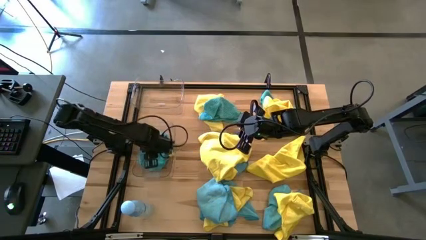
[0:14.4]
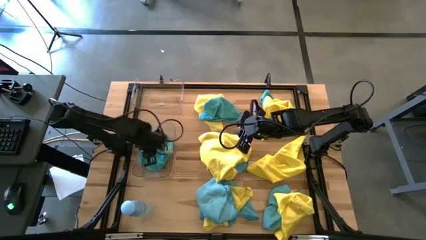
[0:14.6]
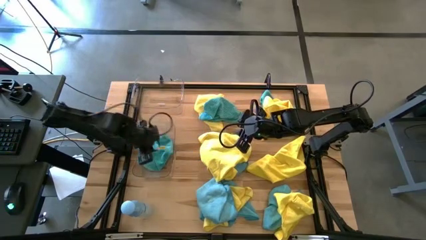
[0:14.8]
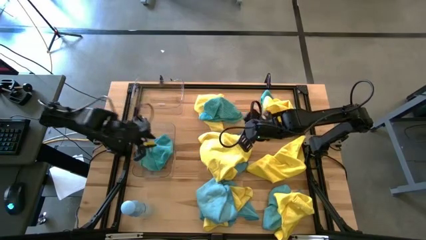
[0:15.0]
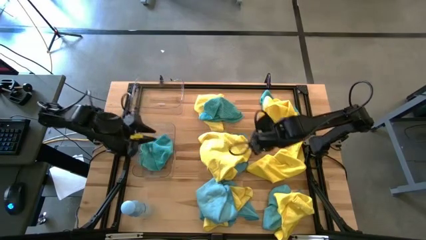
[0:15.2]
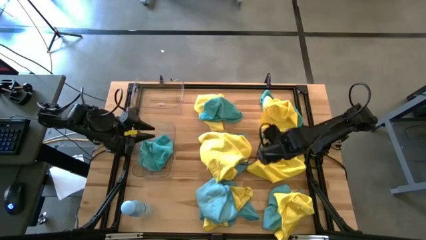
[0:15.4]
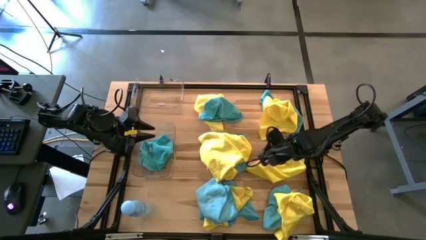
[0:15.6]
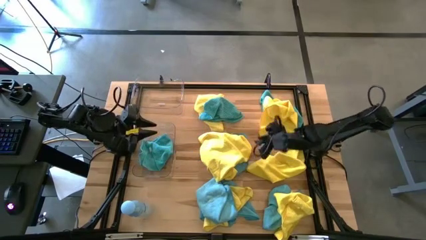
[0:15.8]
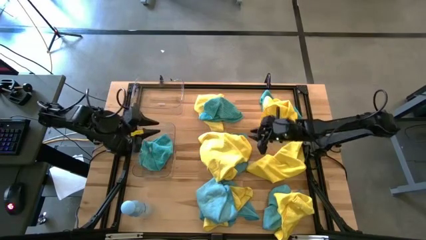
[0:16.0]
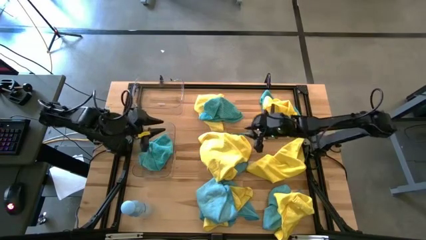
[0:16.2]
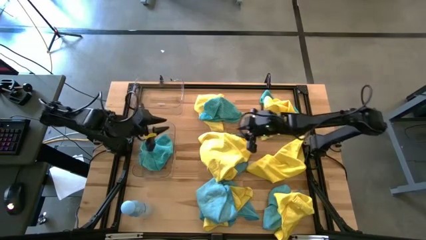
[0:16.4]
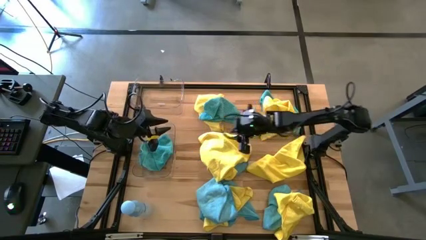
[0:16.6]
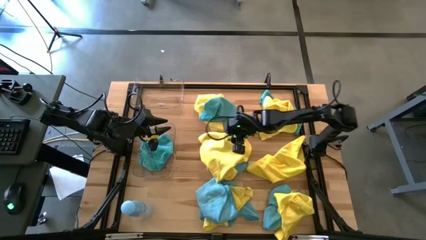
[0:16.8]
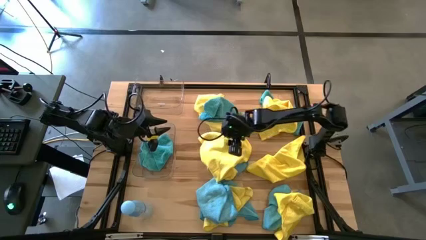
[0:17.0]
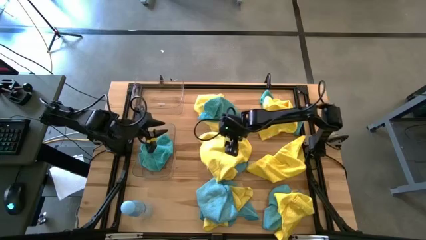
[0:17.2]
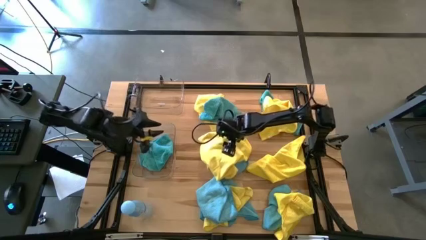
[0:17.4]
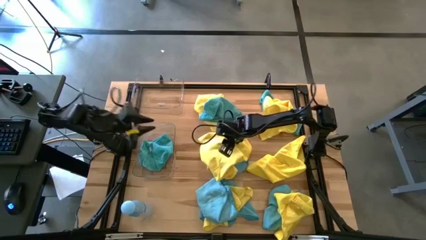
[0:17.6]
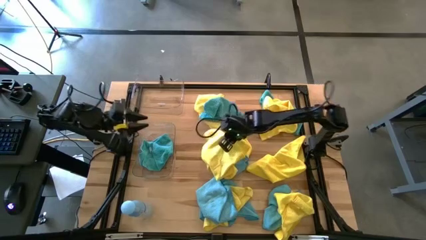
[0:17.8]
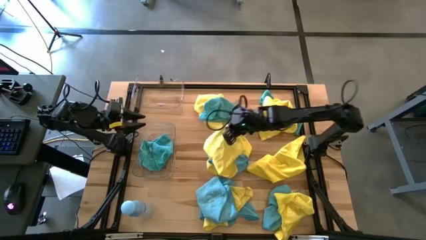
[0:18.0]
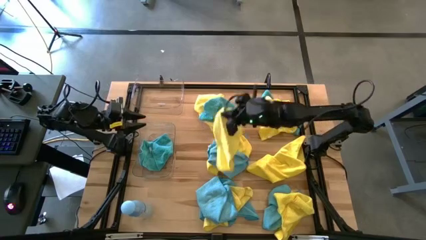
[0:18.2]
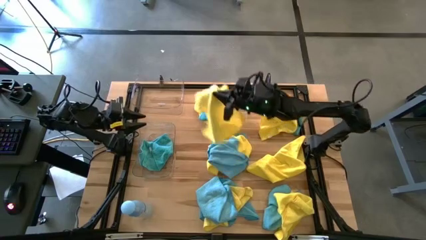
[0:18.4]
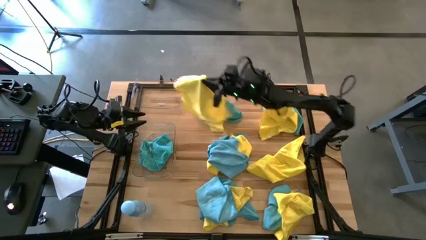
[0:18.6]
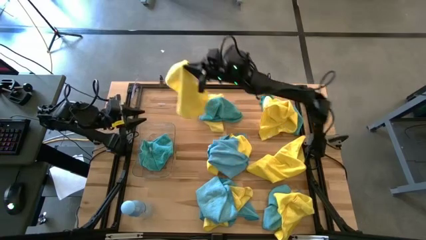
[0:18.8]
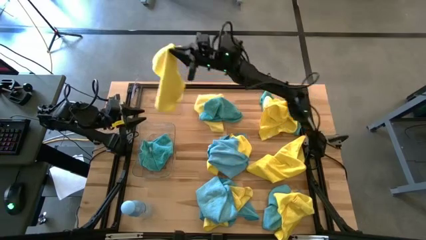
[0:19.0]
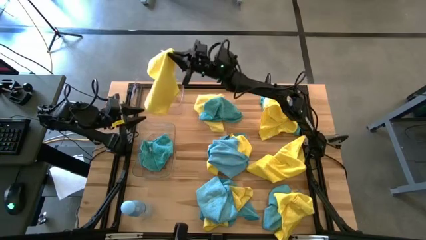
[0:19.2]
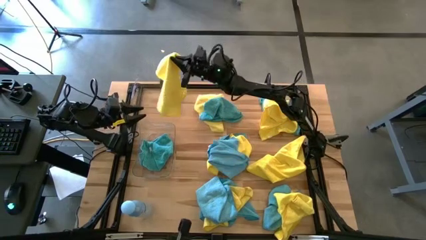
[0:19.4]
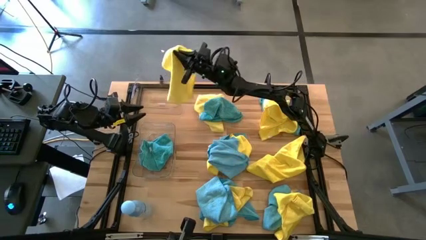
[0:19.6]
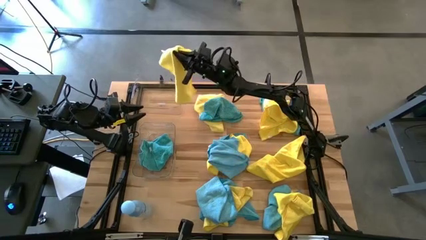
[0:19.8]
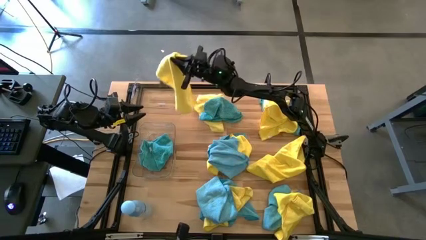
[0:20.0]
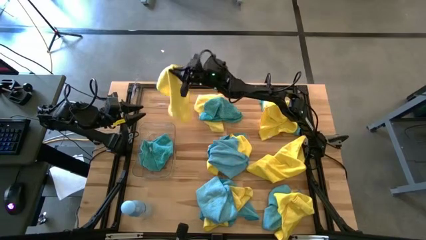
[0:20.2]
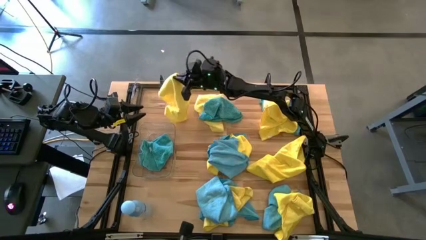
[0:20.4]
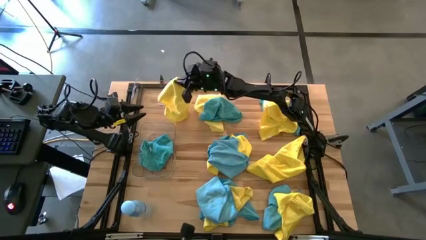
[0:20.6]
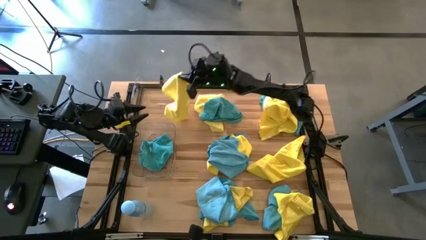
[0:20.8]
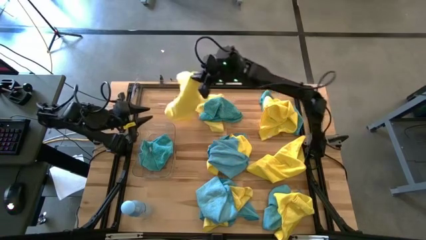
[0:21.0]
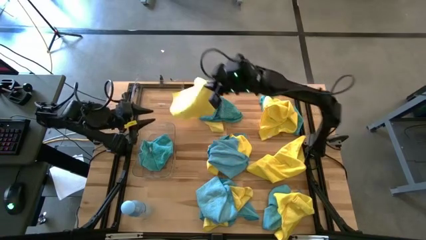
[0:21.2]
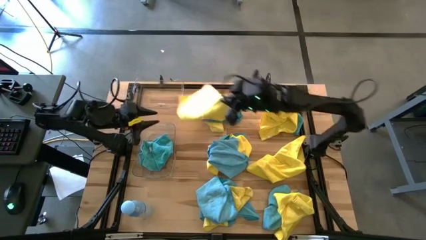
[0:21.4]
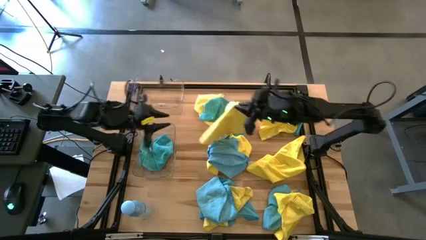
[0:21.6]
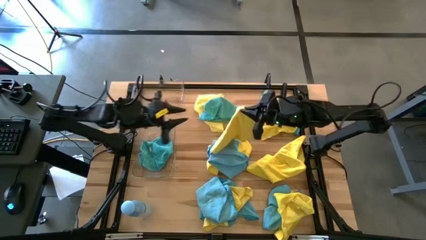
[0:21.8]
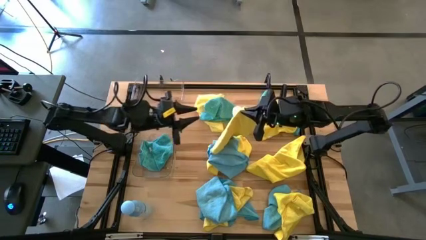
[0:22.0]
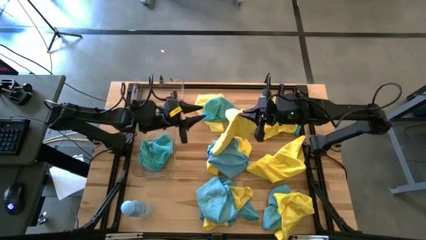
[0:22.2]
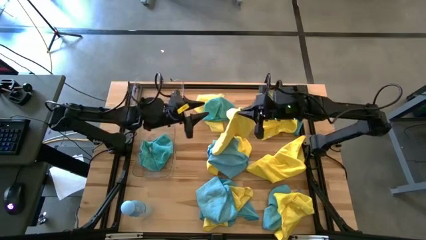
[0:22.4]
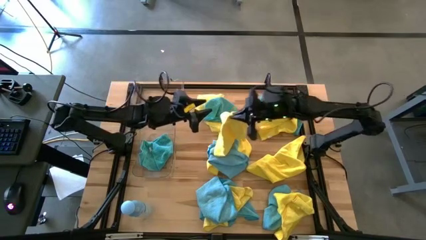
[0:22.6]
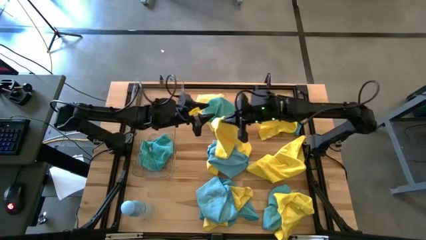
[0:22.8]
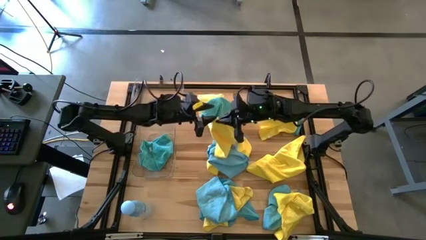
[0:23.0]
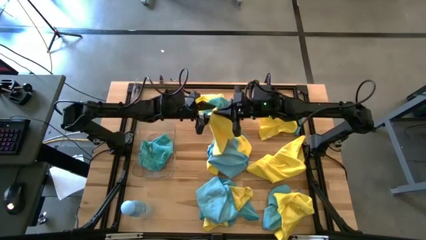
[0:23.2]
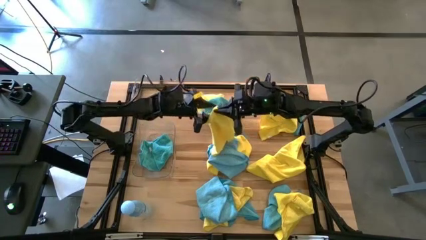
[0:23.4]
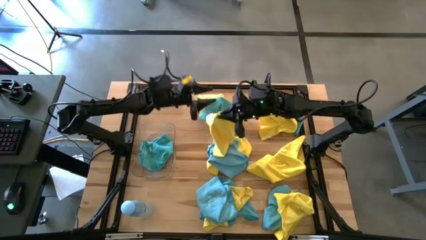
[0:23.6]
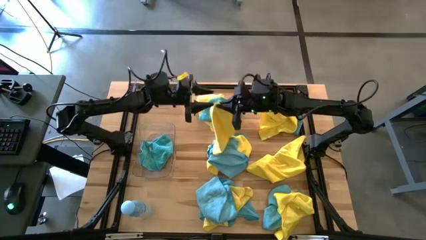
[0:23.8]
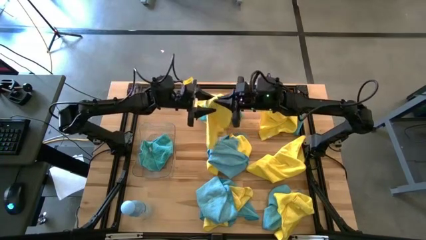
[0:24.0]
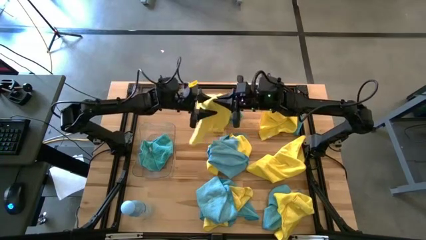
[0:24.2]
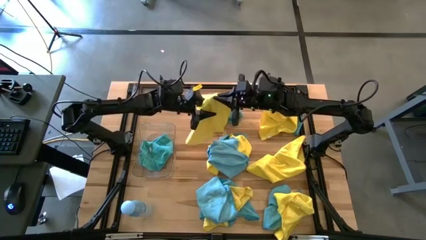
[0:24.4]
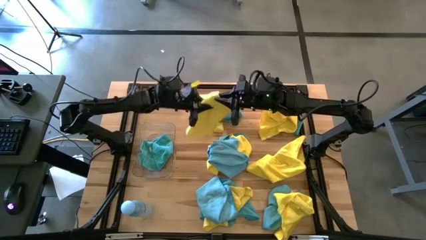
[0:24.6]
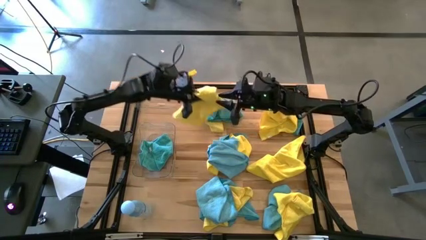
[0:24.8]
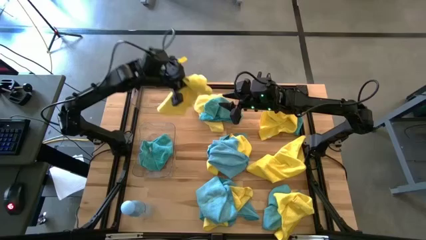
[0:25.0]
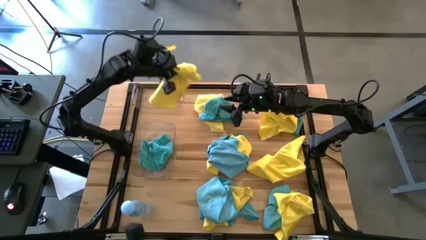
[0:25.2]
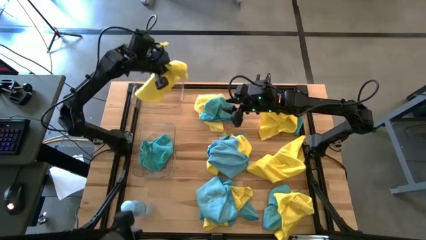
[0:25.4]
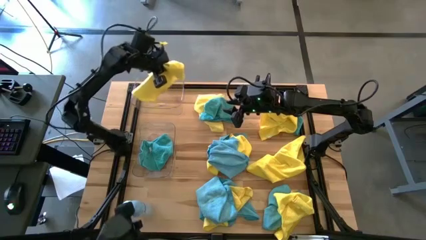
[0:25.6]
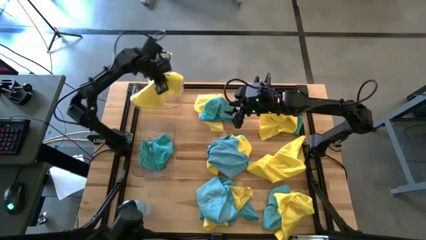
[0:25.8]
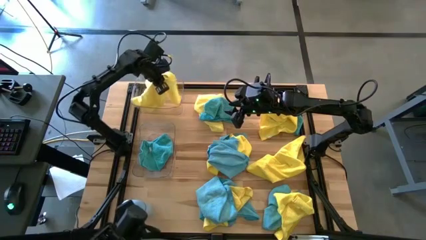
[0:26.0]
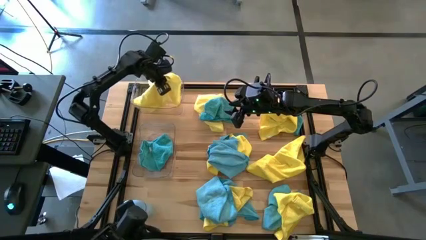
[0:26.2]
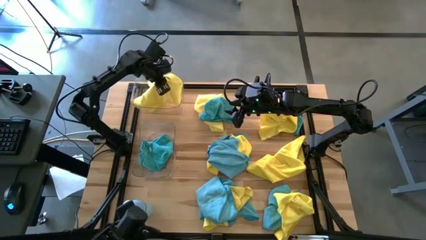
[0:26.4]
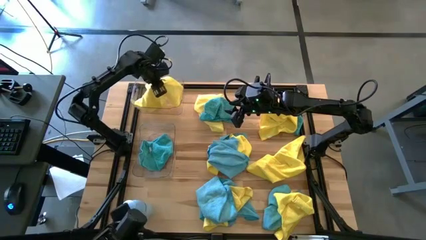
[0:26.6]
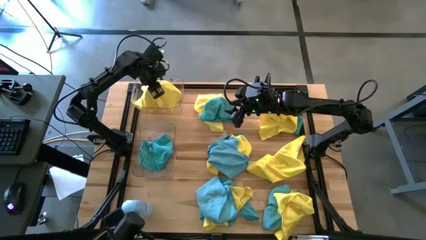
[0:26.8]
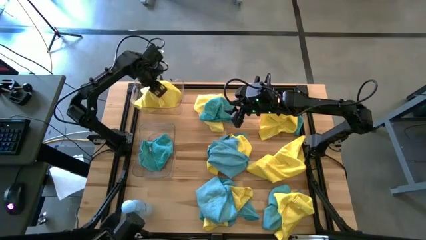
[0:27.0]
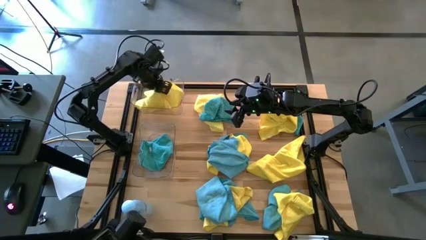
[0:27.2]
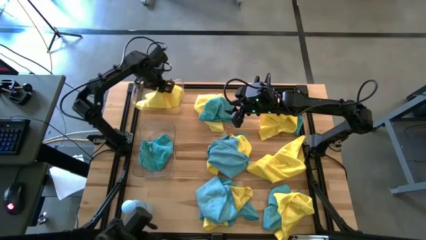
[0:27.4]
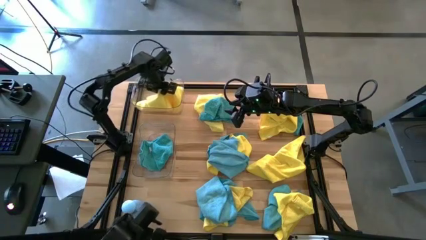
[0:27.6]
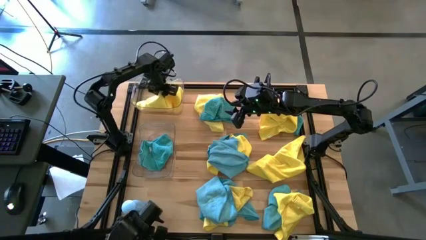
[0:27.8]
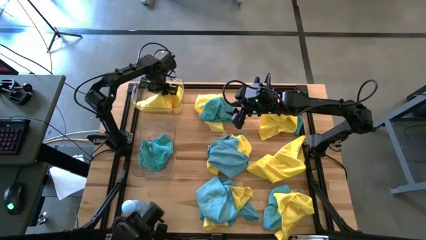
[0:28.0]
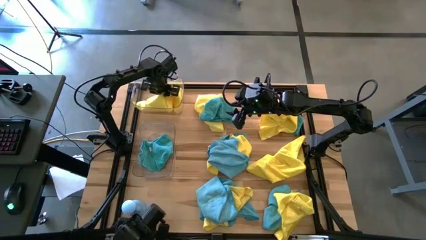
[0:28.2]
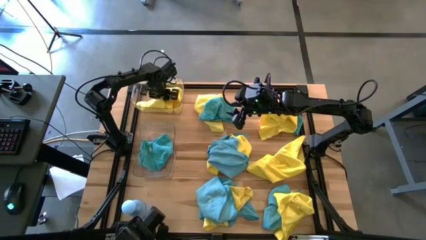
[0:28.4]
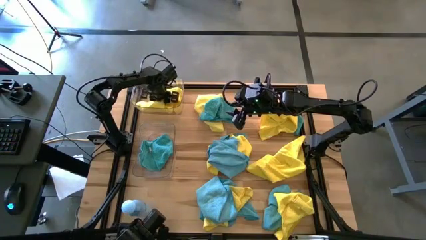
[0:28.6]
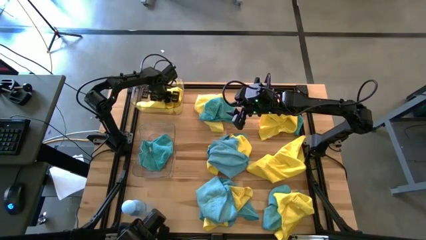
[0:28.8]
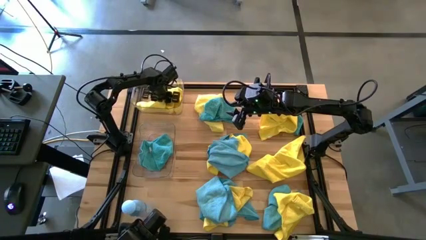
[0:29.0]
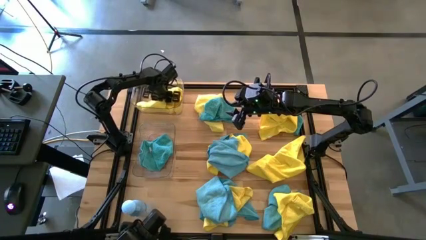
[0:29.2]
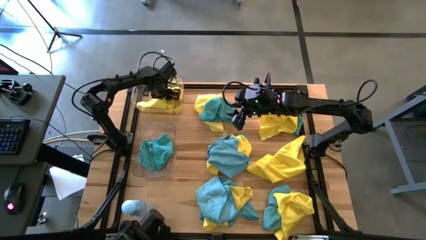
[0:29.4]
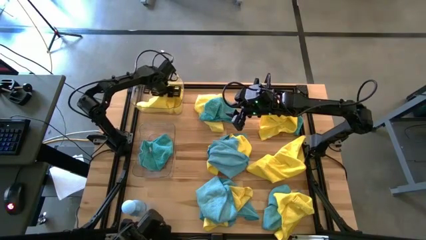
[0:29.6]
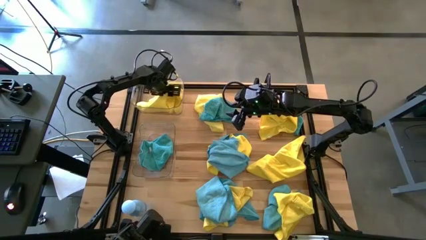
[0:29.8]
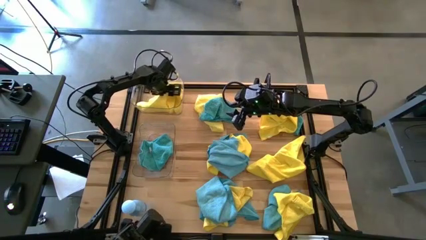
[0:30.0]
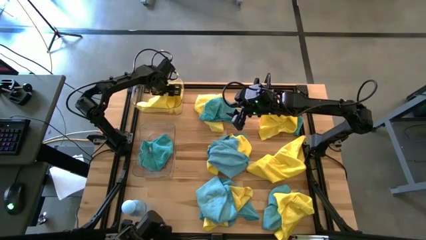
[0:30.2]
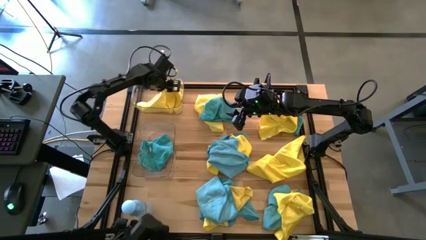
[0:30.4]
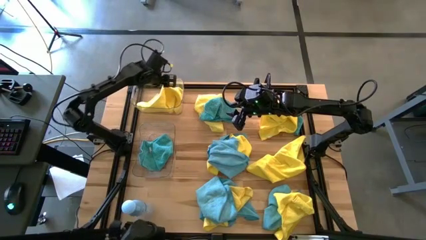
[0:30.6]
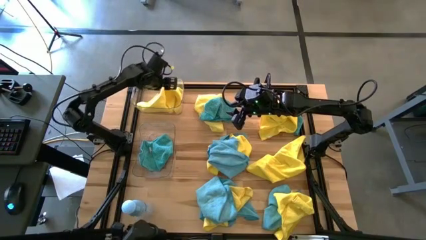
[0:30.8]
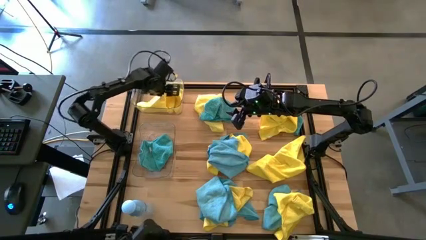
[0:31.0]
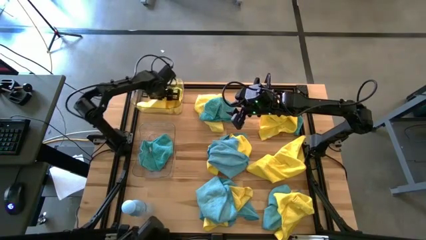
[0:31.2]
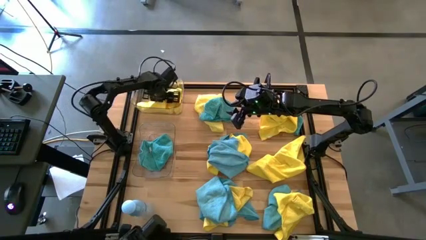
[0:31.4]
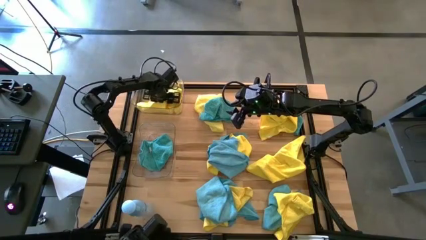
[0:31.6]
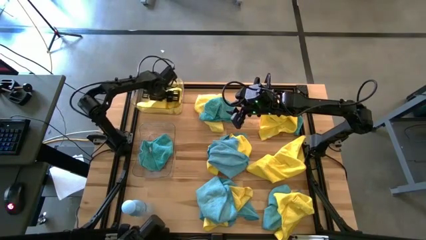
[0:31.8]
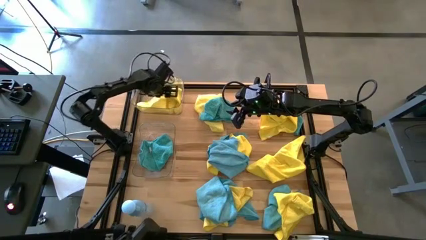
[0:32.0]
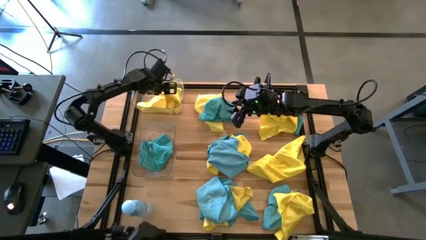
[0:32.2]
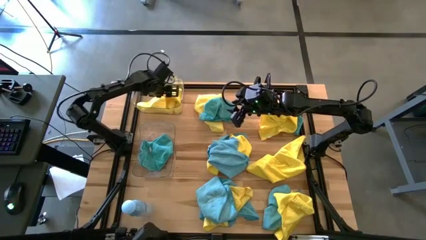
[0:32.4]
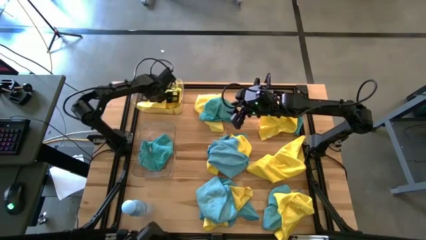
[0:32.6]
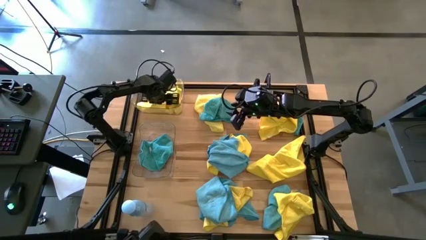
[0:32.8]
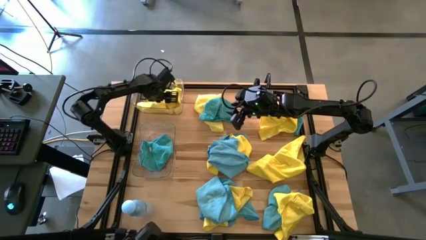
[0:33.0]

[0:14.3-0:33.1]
Task: Sort microfiber towel by color & place in baskets
Put the yellow microfiber cloth into the top transparent bin
